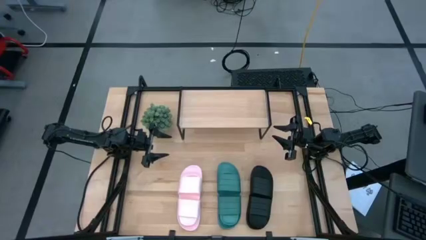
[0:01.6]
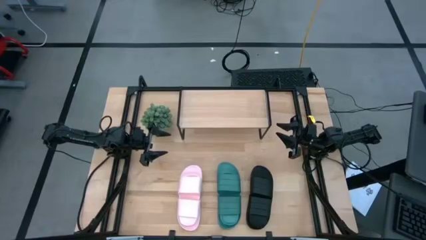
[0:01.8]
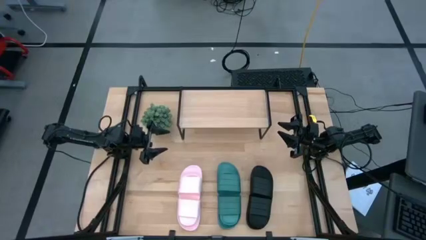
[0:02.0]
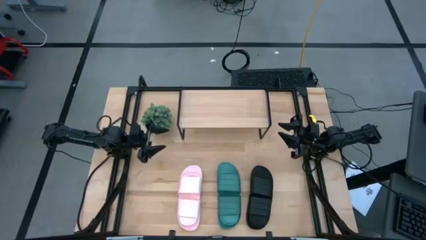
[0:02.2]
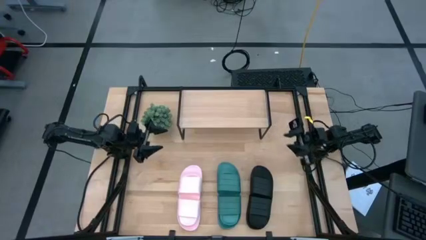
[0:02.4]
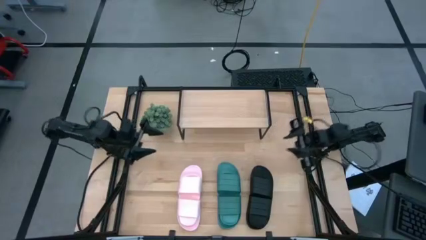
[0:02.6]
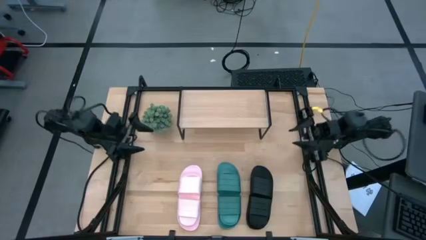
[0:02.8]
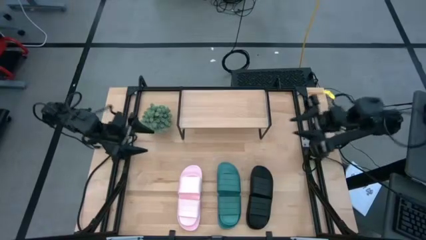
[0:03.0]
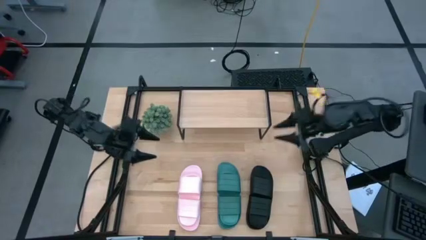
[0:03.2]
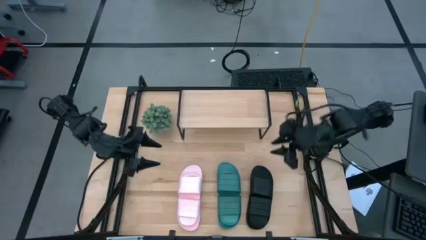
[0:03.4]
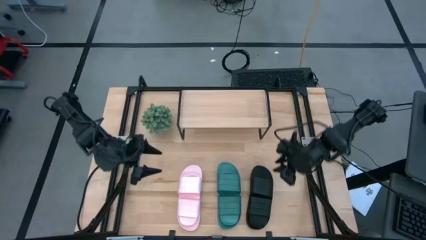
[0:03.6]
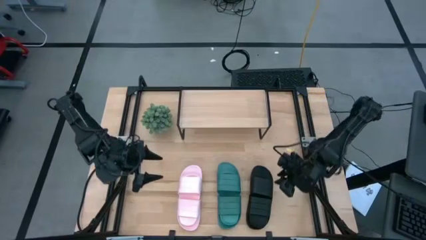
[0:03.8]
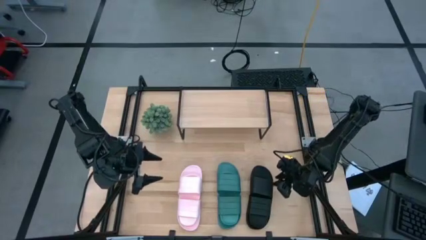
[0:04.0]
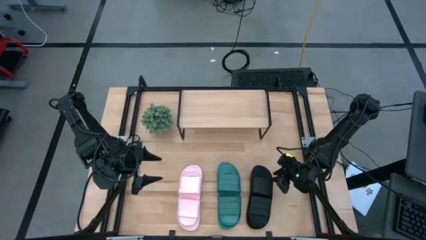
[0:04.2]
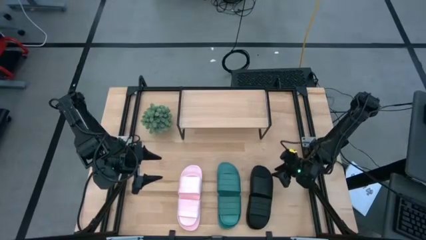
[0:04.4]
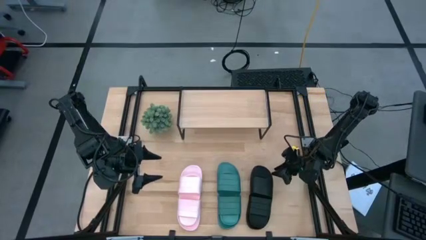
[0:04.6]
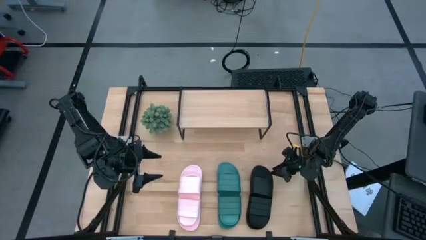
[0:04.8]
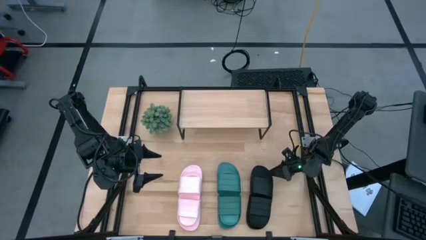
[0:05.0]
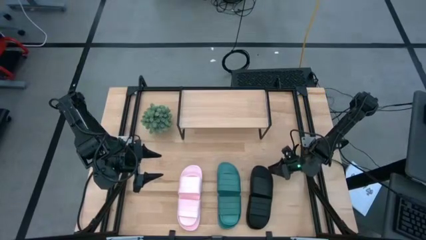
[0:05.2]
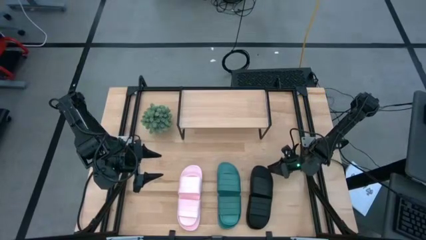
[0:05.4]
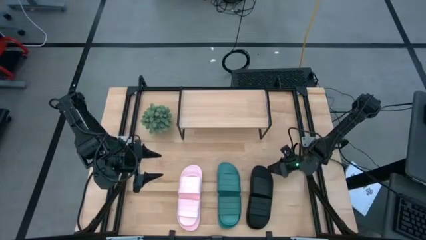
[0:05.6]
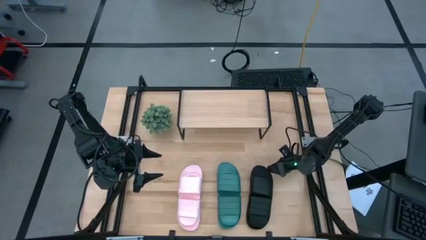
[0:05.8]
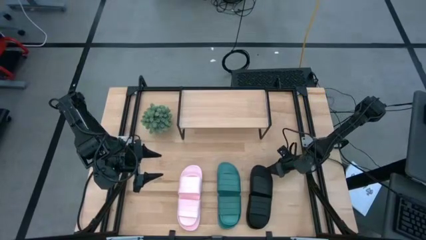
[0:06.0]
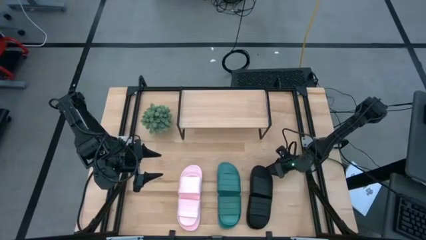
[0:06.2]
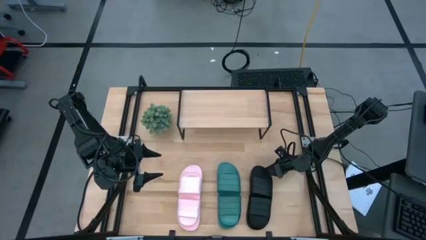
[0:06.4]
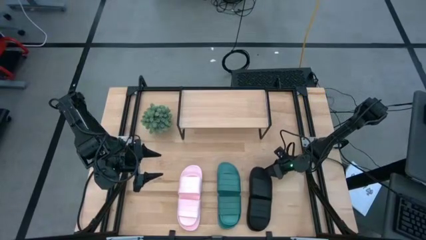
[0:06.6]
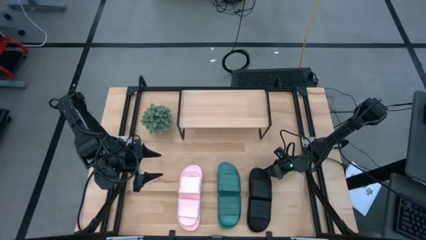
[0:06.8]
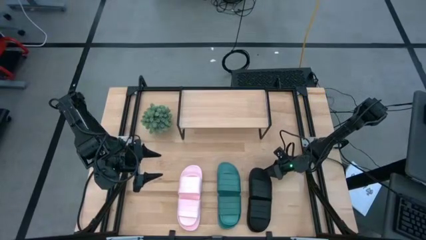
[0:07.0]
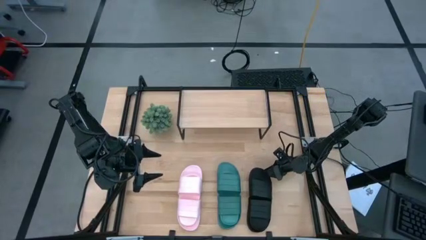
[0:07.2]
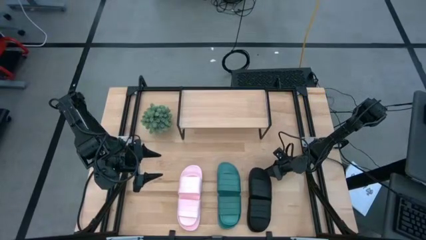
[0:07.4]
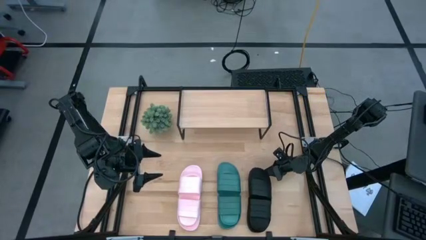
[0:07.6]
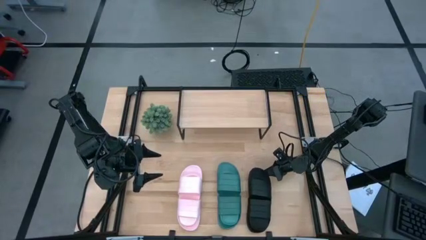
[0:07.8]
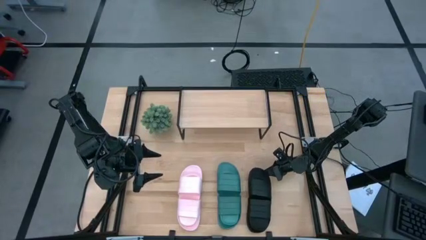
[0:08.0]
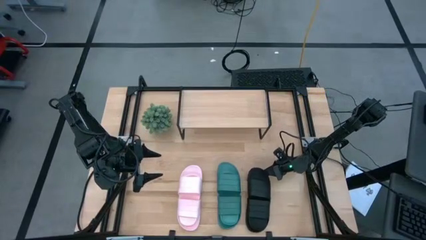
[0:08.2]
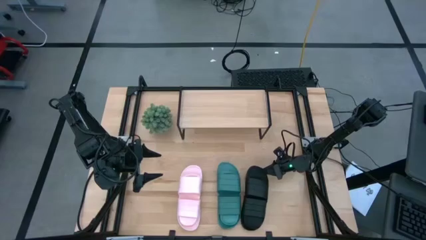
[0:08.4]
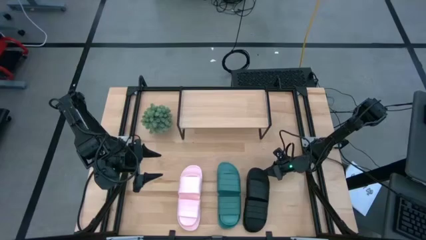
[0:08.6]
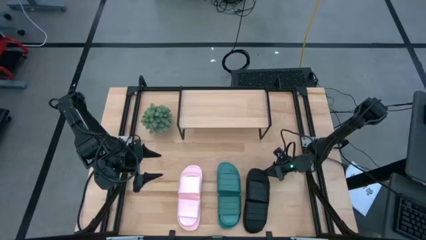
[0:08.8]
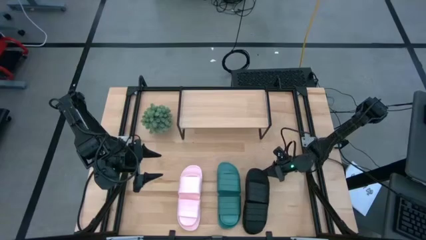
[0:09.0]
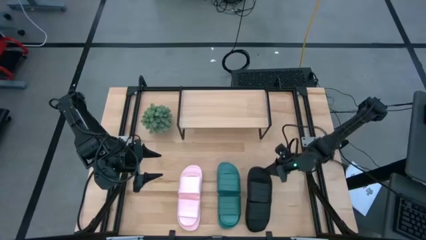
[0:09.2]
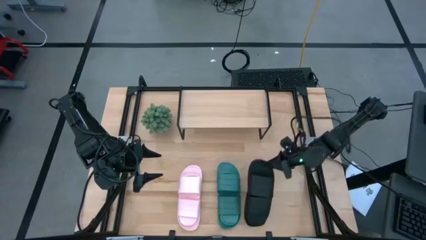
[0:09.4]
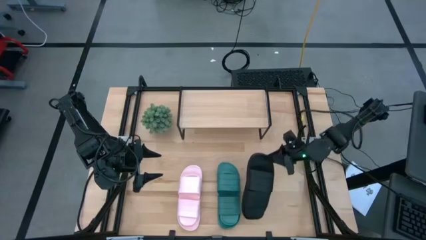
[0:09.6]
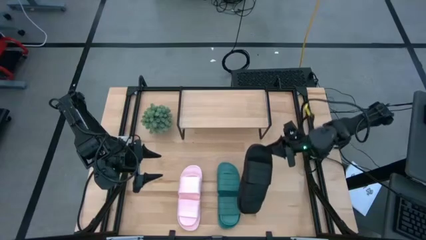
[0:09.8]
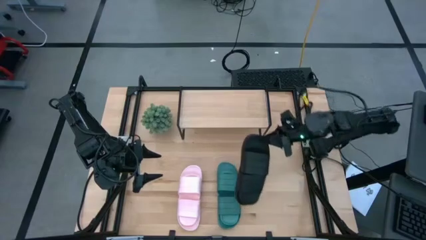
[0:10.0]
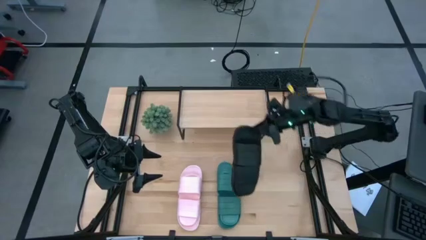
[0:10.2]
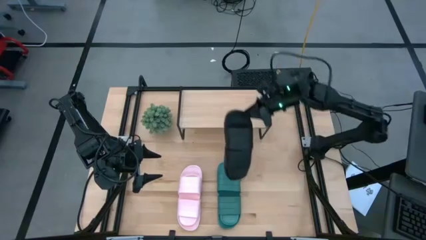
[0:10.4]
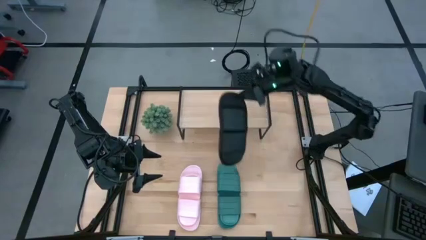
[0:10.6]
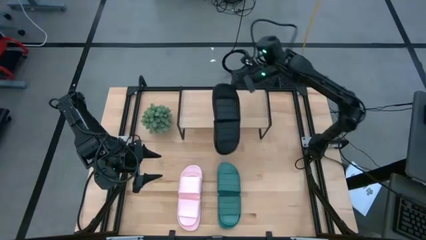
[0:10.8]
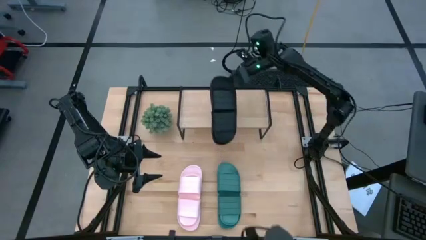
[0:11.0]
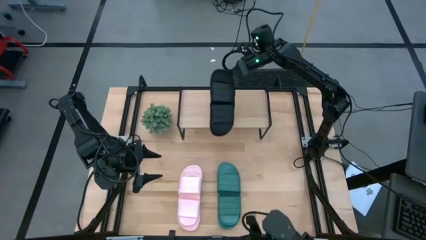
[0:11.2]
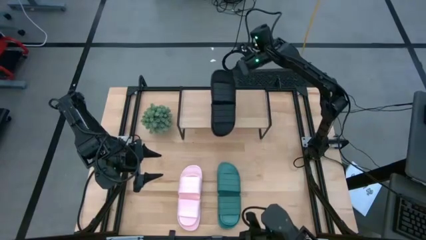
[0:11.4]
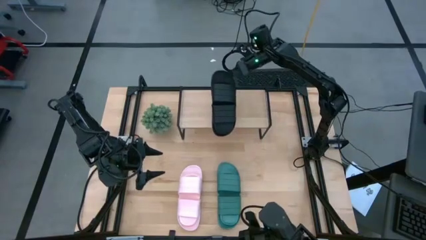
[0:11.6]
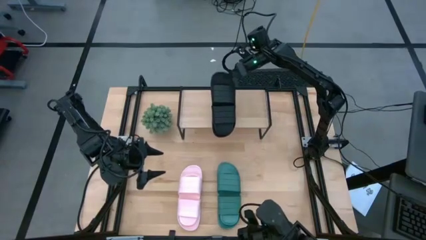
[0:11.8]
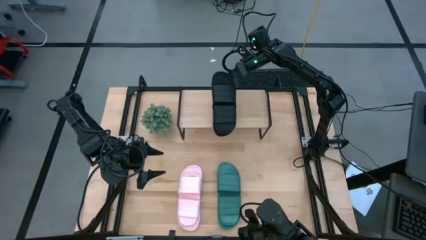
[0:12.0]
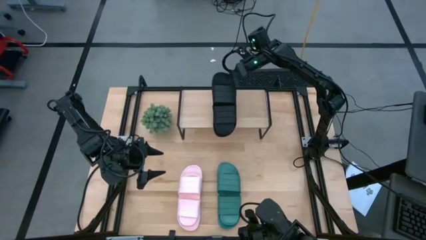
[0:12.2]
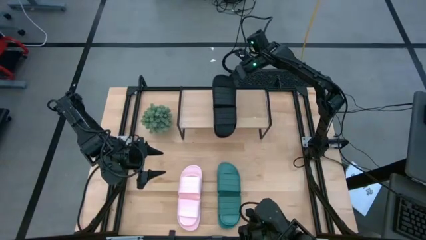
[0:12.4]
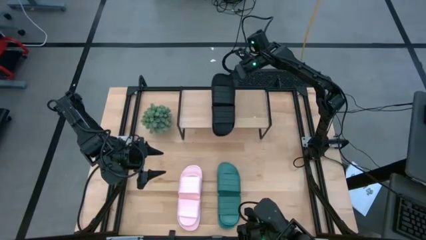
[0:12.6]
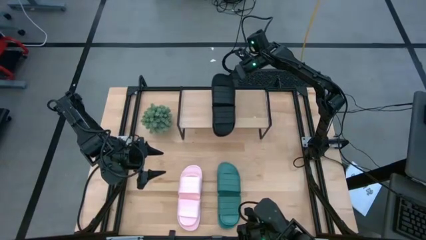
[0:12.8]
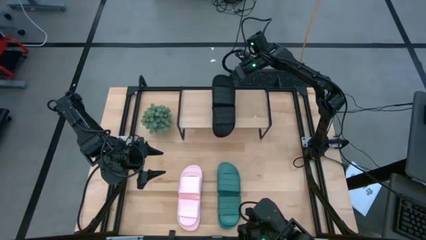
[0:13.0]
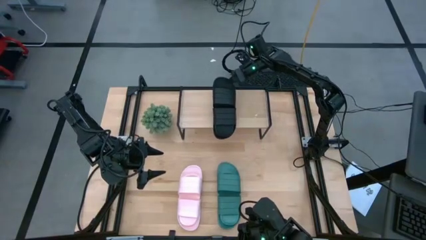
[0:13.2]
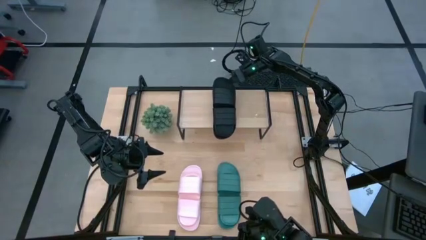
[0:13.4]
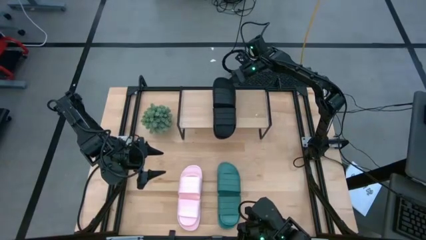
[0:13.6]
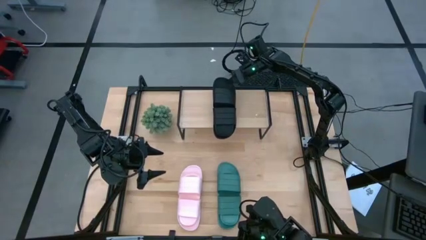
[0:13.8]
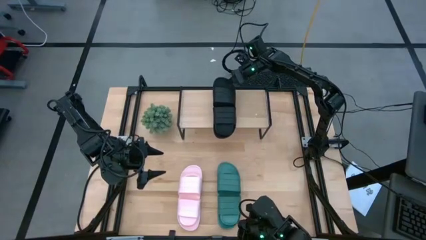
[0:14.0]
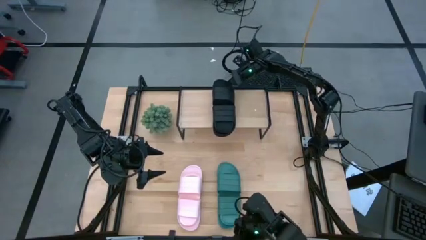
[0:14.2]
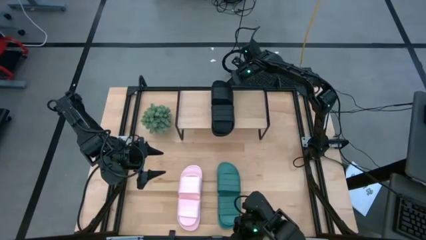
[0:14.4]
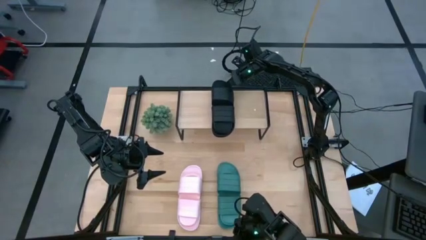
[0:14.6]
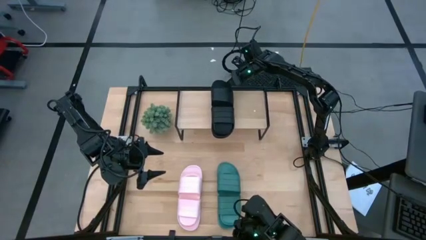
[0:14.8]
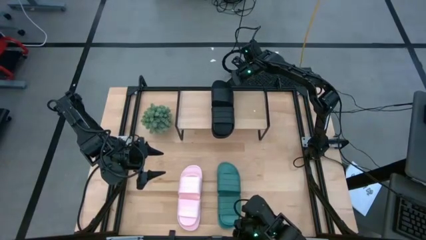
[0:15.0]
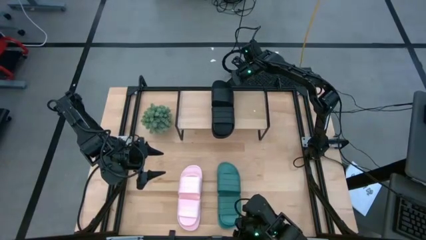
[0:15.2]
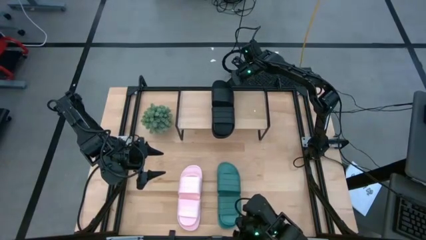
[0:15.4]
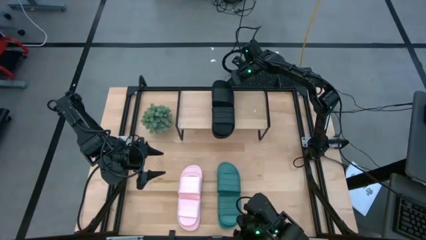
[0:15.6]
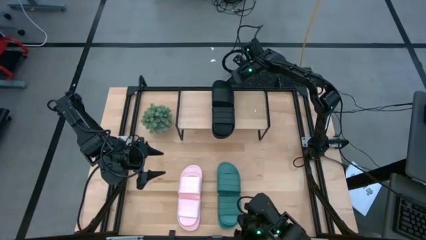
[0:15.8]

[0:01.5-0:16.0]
Task: Pick and place slides into the shelf
Put the black slippers on the shelf
